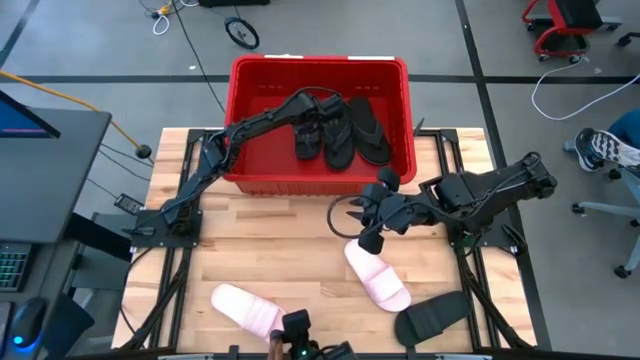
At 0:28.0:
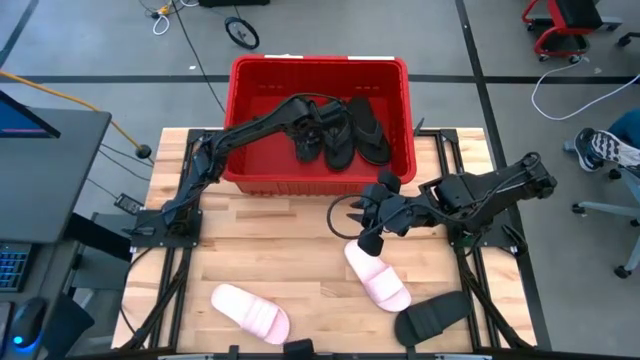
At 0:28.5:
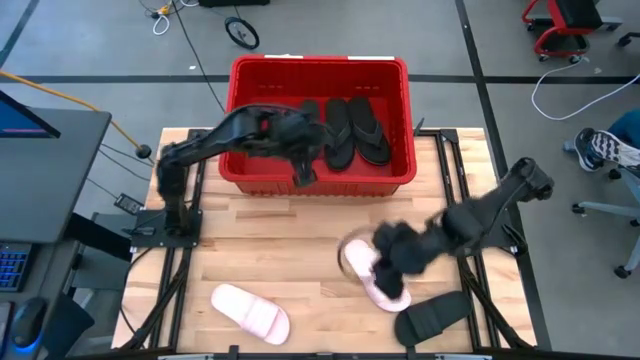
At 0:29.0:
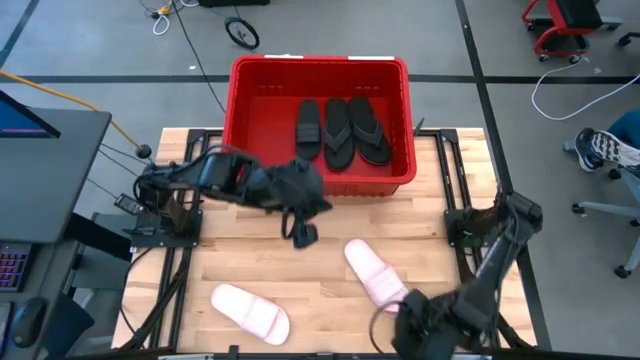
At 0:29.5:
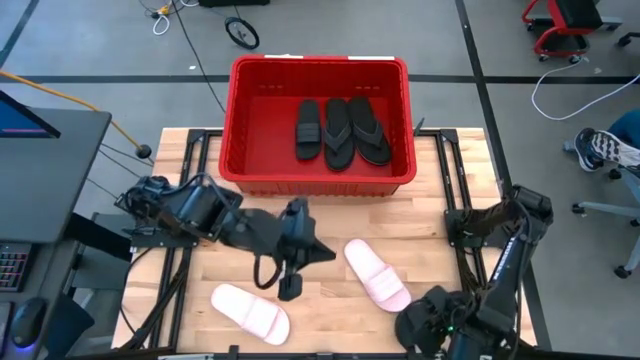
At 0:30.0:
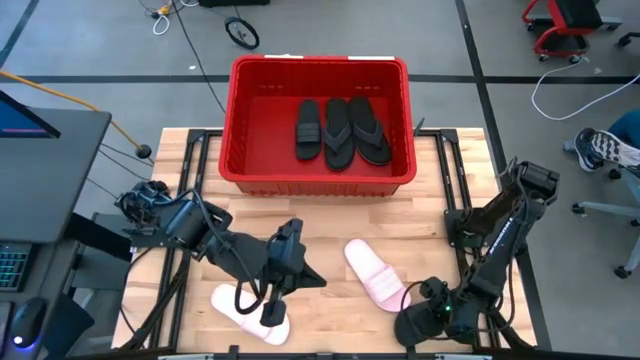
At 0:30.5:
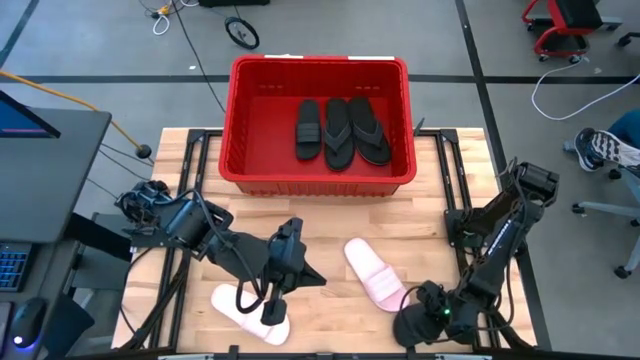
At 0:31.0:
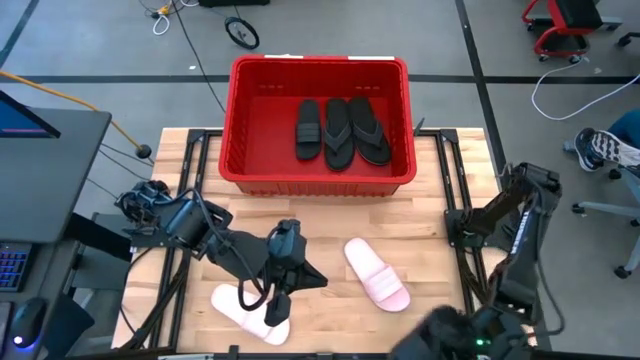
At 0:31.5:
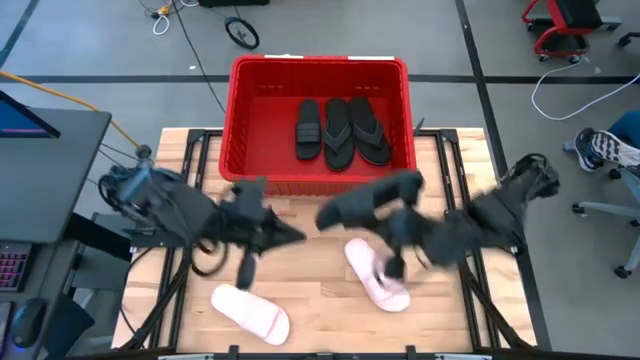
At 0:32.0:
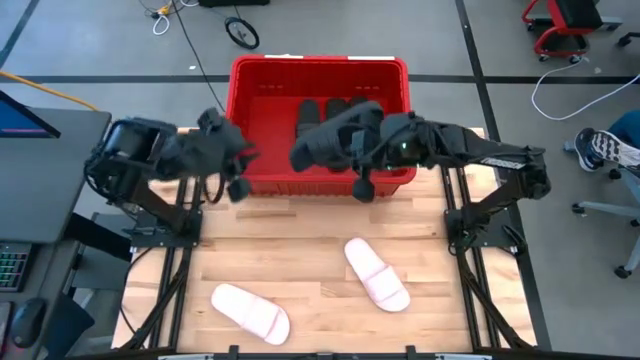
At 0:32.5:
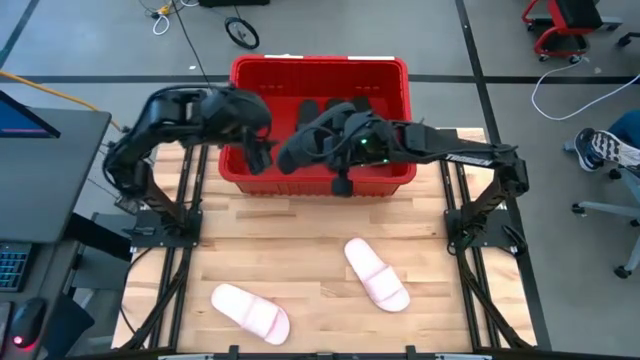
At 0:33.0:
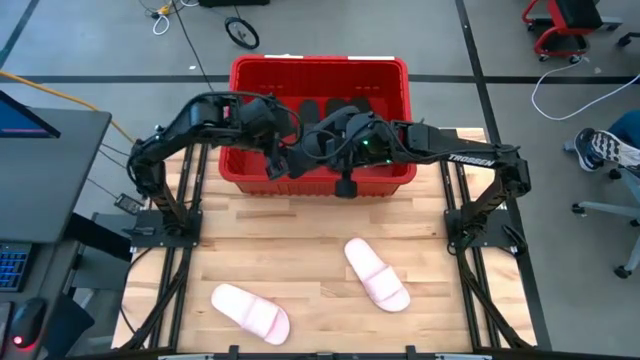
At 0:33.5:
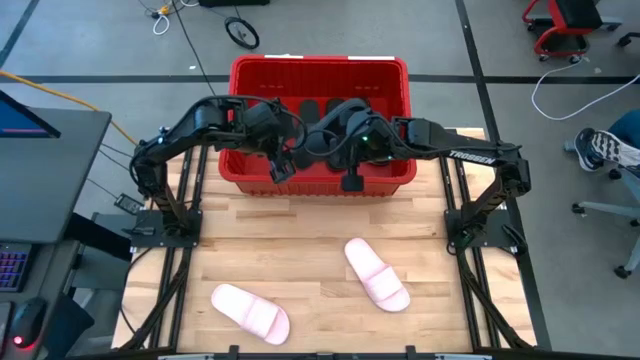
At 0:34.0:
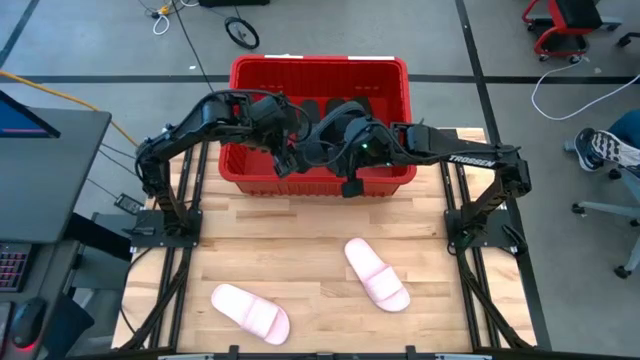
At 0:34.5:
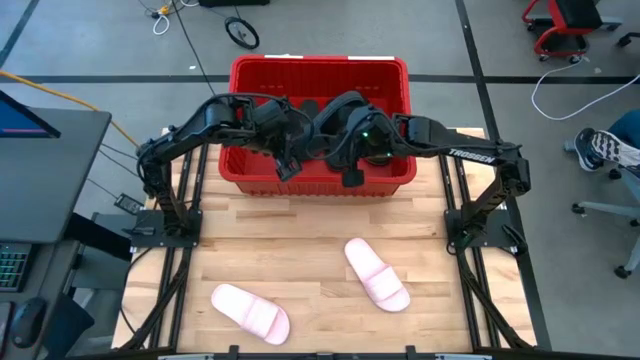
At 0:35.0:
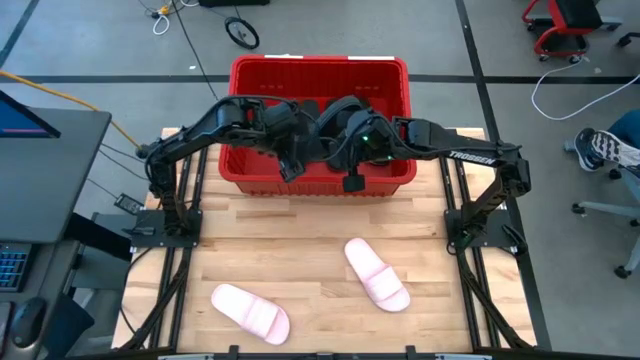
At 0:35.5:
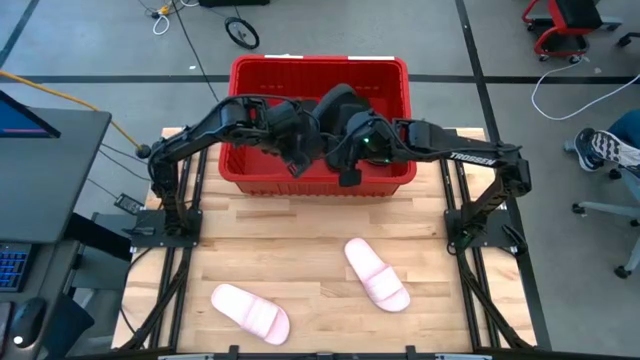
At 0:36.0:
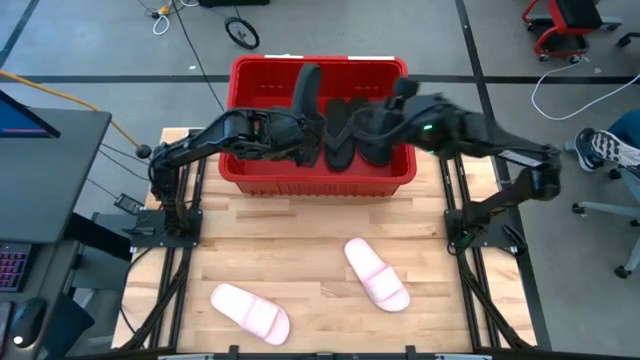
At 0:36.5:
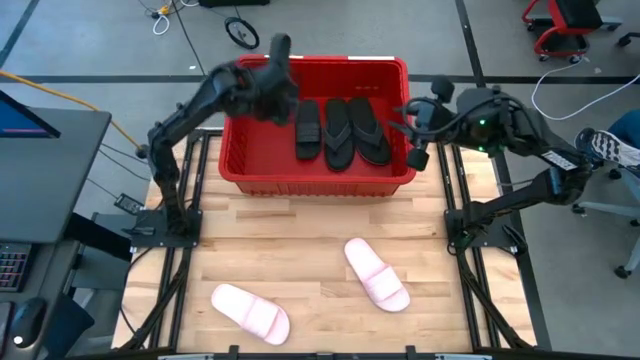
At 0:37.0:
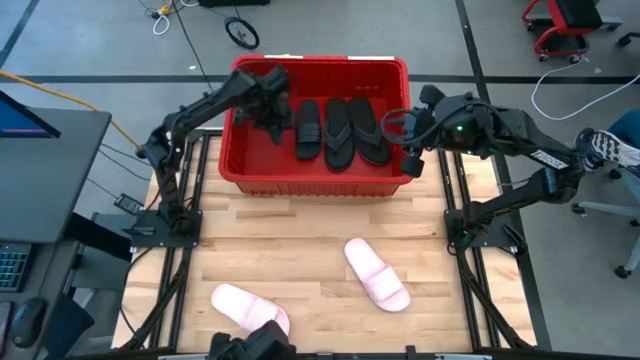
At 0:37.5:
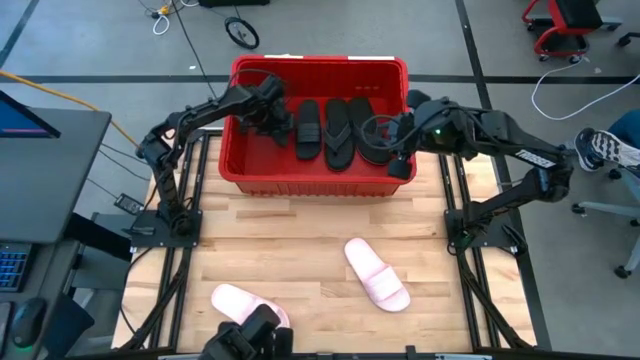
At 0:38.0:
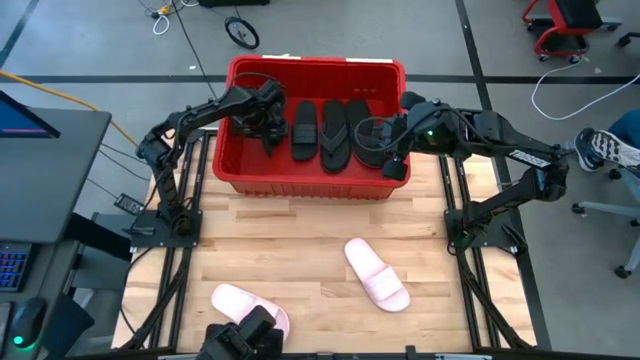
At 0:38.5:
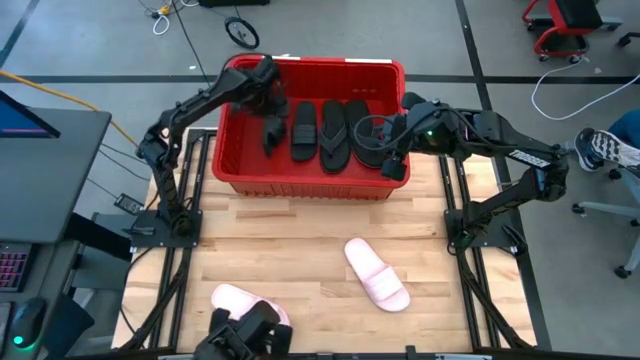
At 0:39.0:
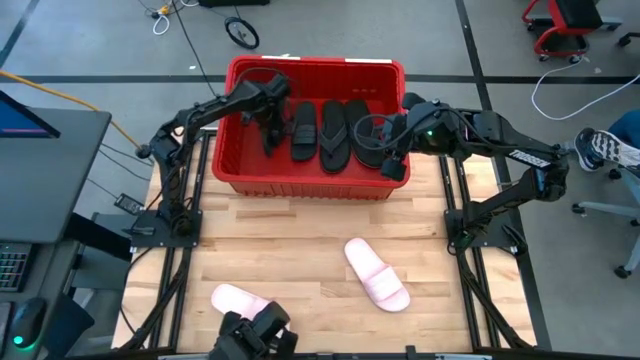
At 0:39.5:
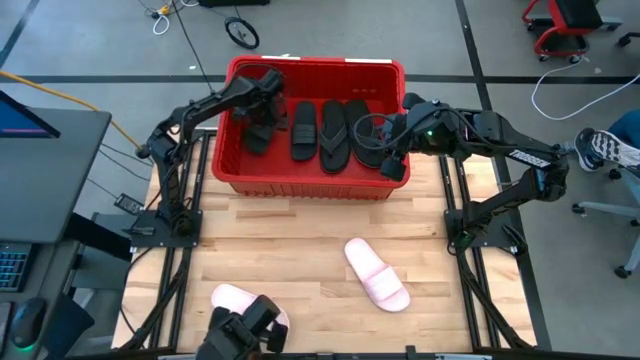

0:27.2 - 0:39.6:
Task: Pick and place slides into bin
Put the black slide into the red container

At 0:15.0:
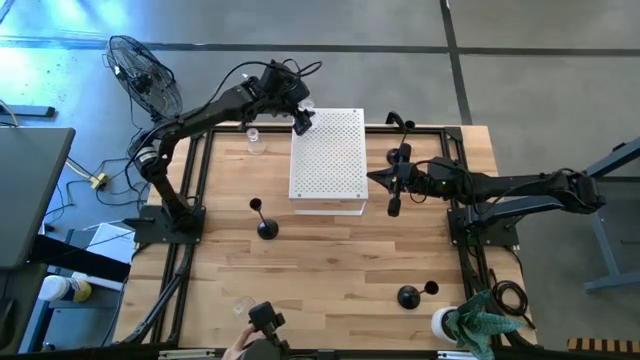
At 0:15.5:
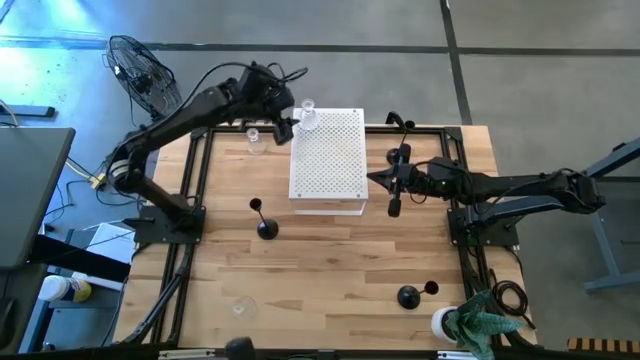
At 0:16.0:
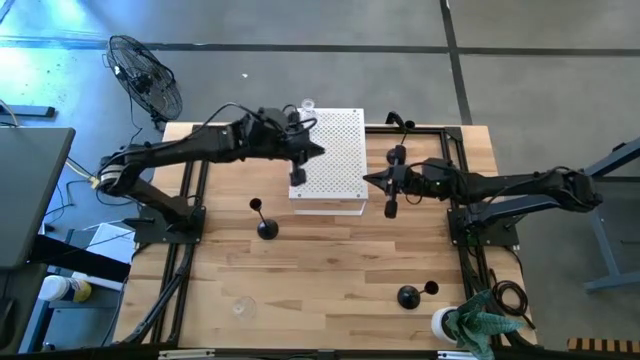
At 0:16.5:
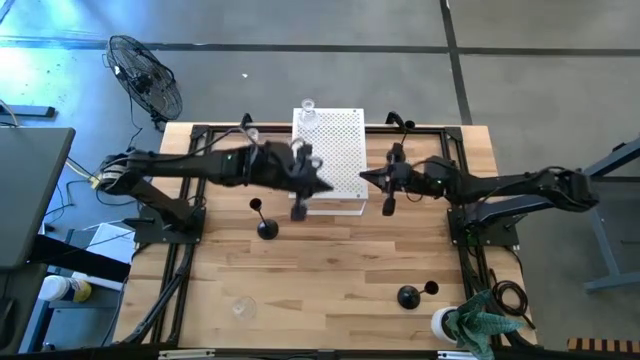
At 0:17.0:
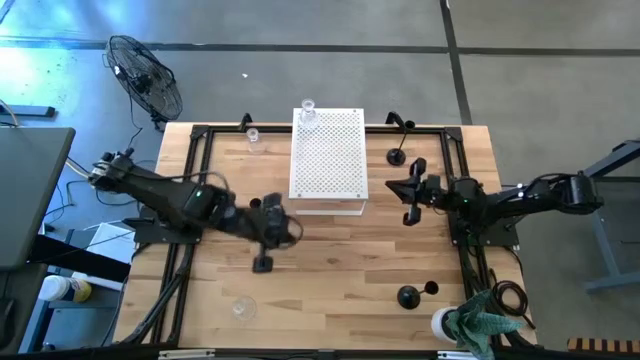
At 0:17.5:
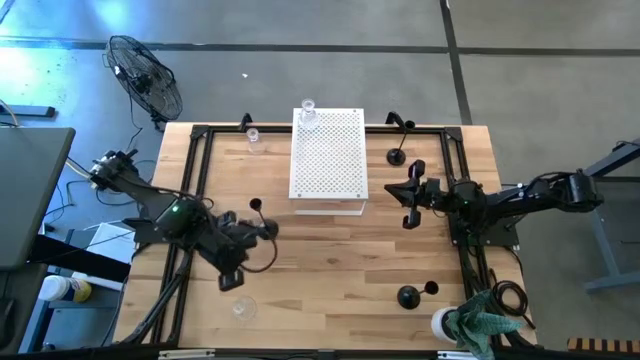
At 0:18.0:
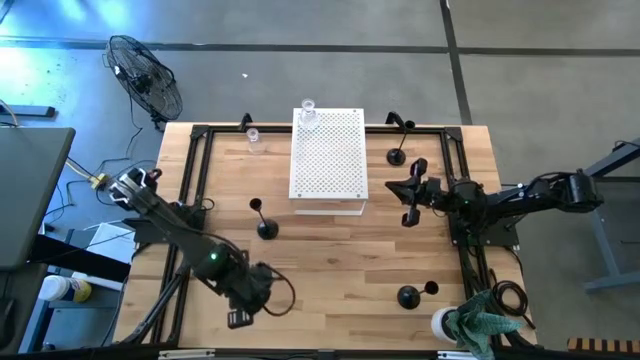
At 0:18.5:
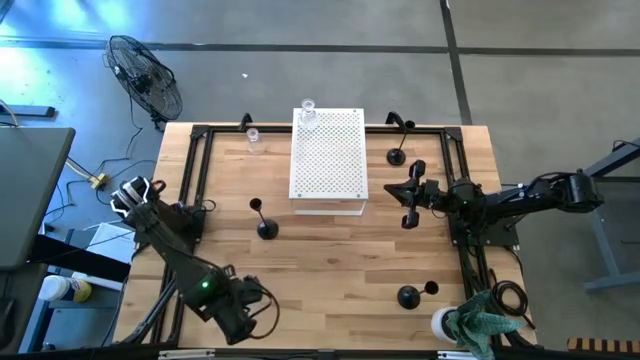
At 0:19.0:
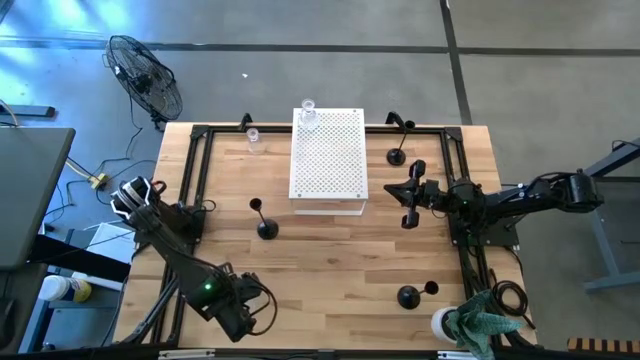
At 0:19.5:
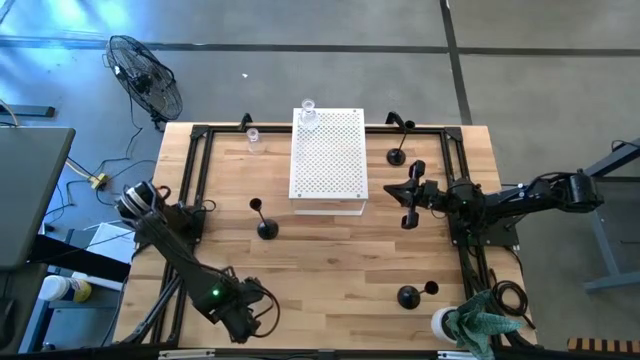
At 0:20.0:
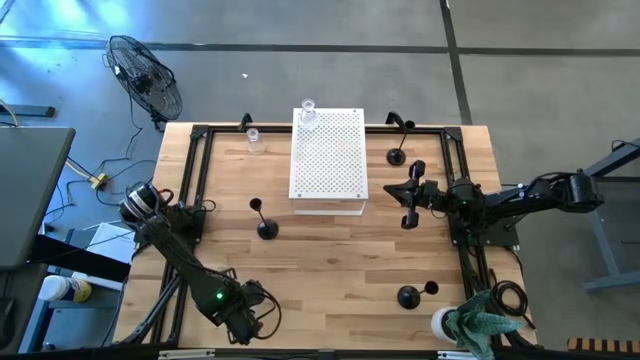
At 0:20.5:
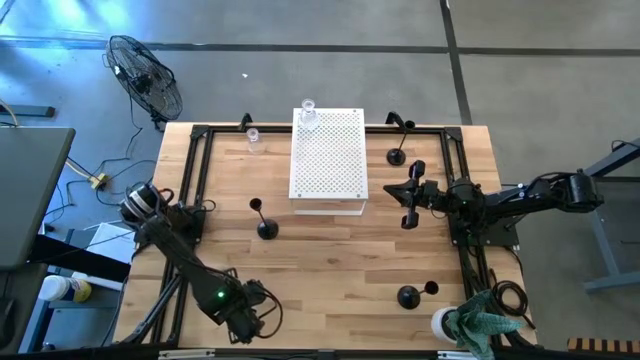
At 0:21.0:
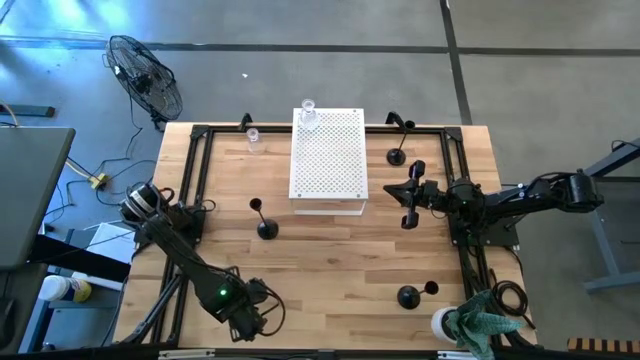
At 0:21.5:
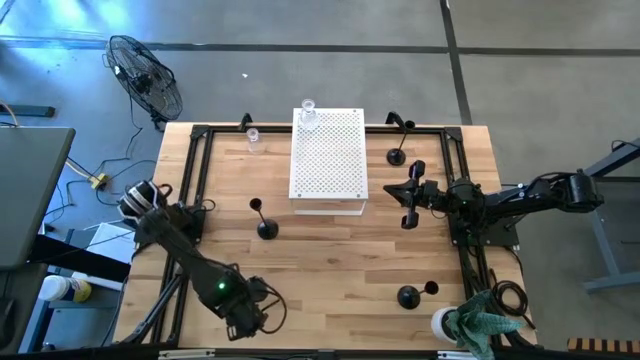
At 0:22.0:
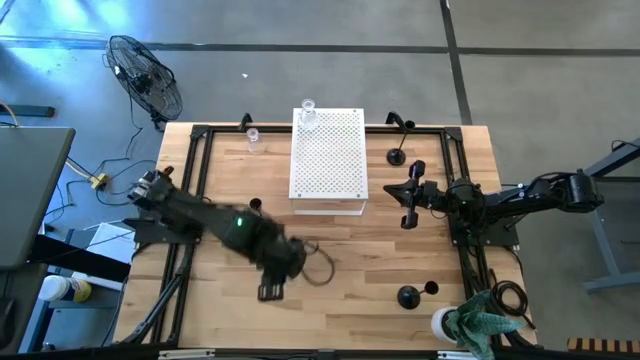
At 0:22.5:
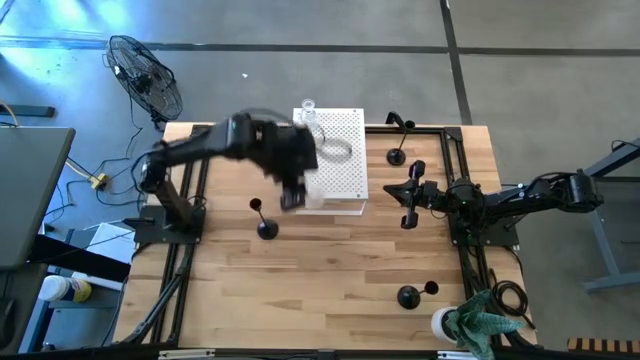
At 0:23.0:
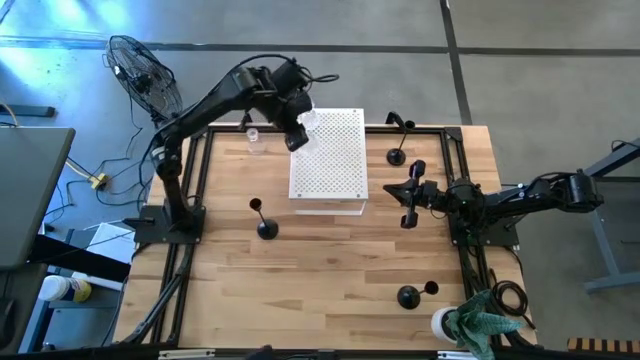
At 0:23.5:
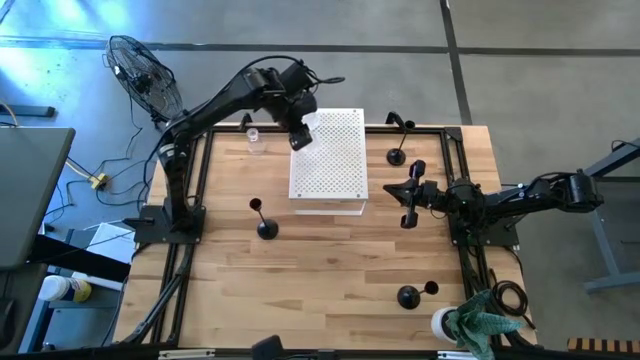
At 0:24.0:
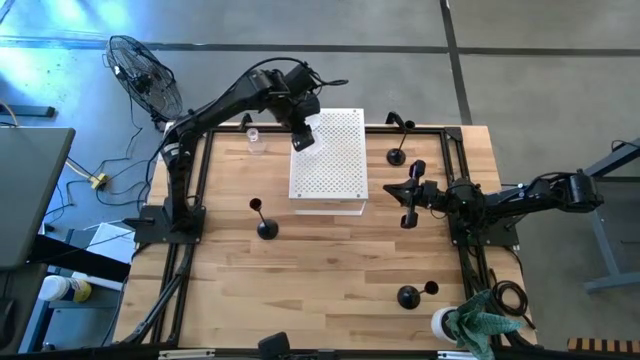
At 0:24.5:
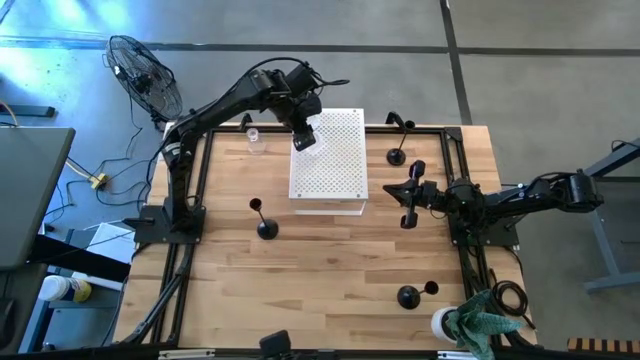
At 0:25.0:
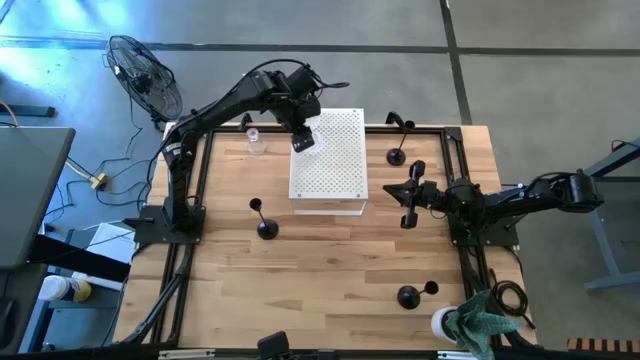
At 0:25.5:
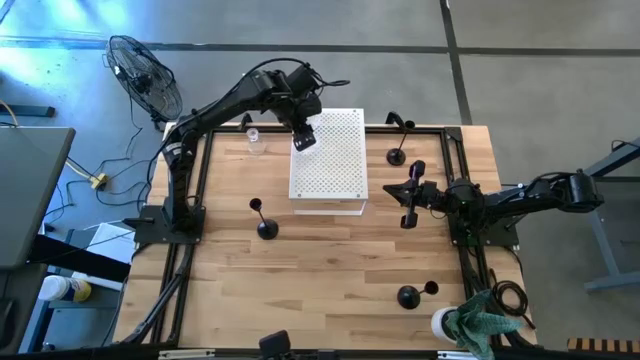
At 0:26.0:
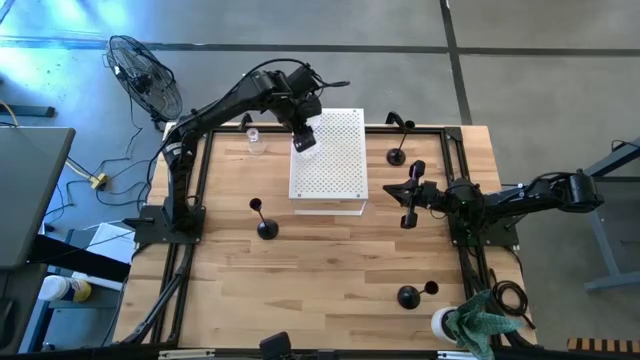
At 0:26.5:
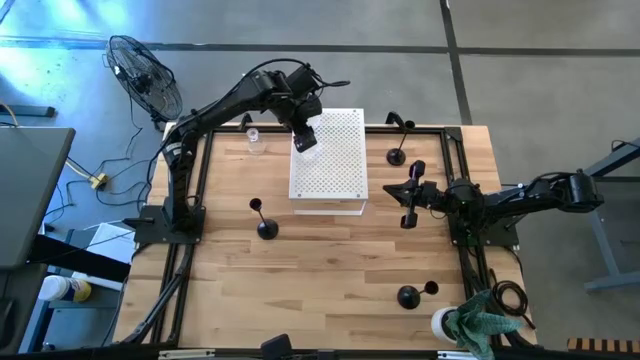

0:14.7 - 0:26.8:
Task: Pick & Place candle stick holders
Put the bottom transparent candle holder on the shelf aligned with the other transparent candle holder
